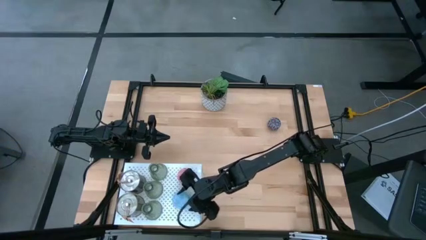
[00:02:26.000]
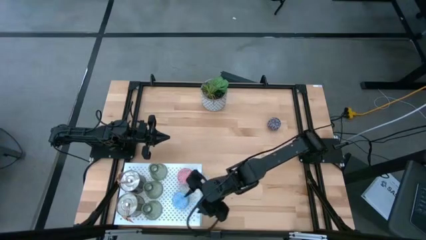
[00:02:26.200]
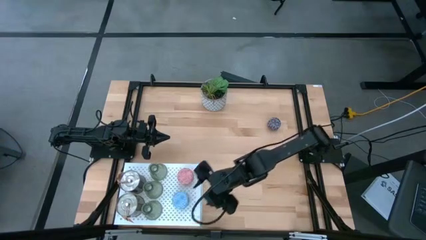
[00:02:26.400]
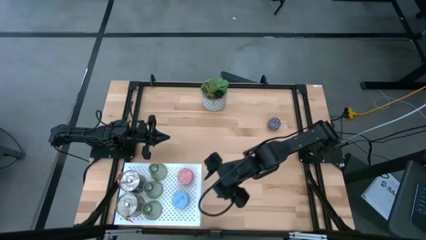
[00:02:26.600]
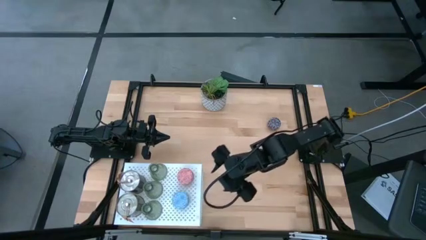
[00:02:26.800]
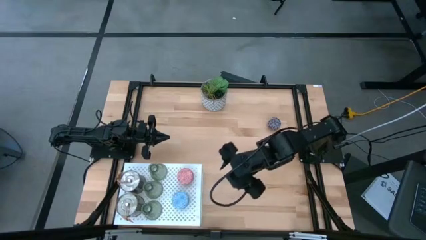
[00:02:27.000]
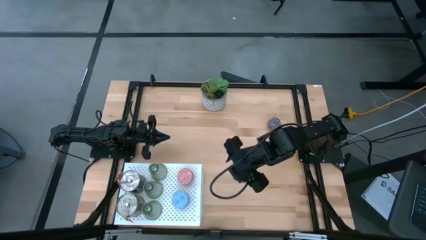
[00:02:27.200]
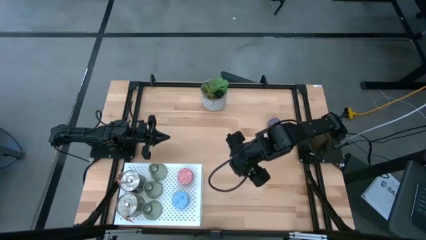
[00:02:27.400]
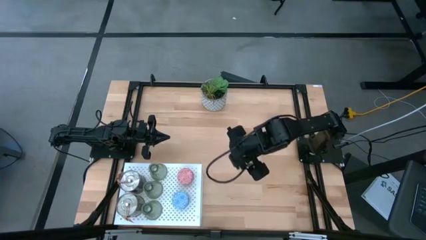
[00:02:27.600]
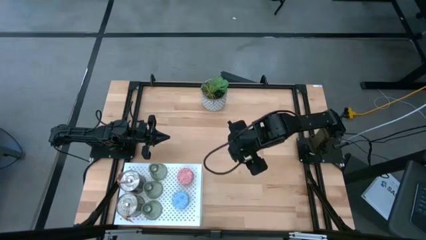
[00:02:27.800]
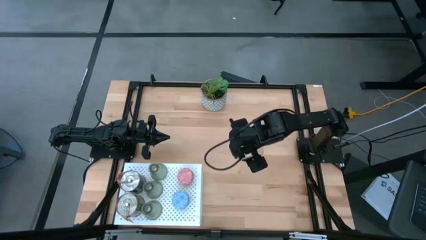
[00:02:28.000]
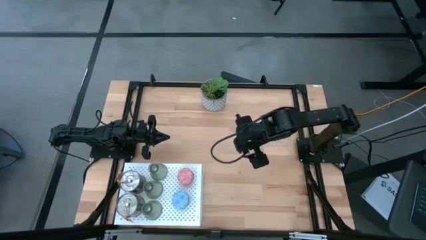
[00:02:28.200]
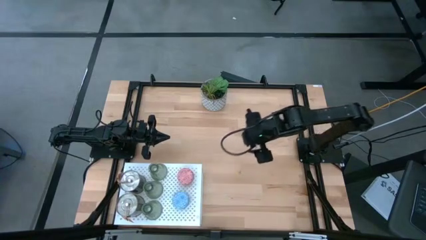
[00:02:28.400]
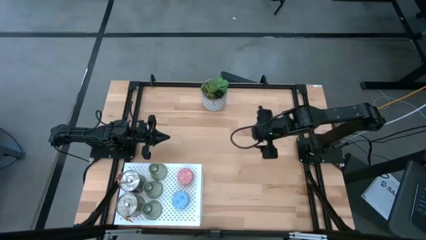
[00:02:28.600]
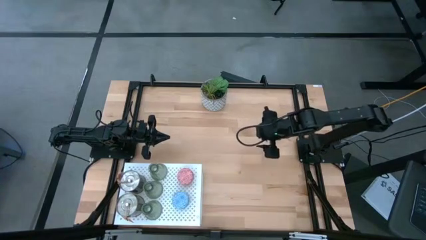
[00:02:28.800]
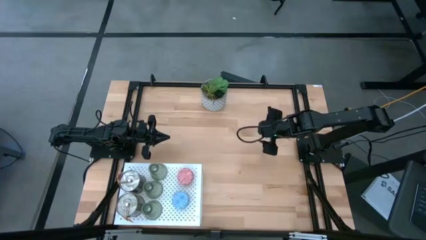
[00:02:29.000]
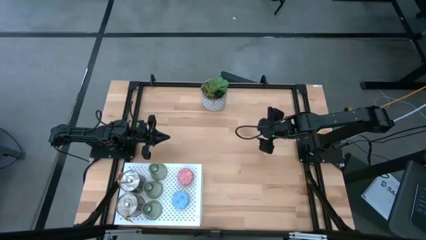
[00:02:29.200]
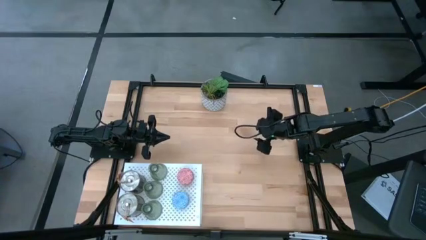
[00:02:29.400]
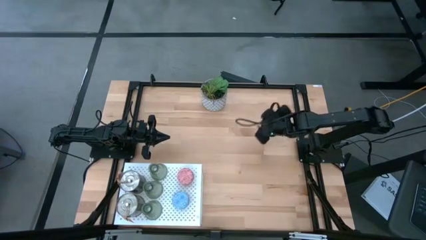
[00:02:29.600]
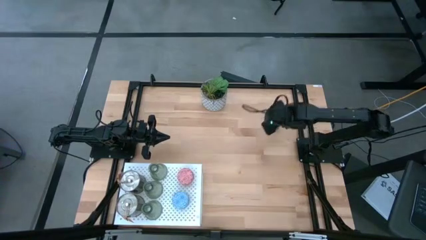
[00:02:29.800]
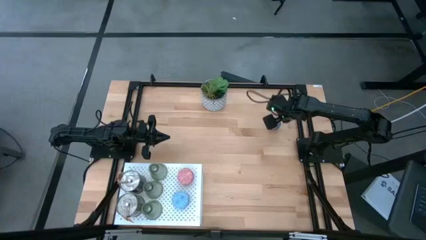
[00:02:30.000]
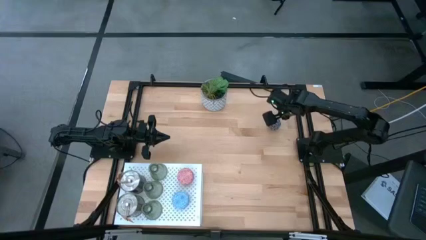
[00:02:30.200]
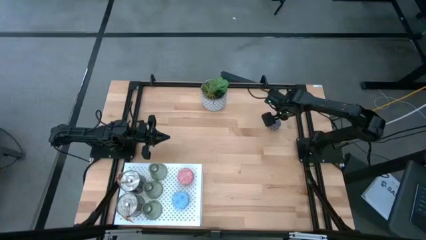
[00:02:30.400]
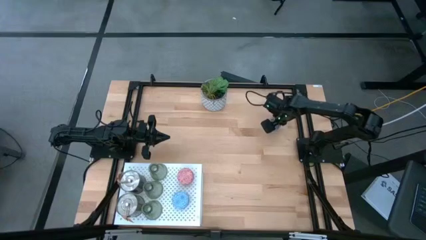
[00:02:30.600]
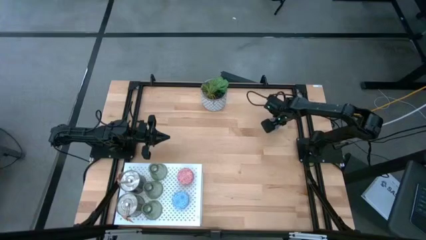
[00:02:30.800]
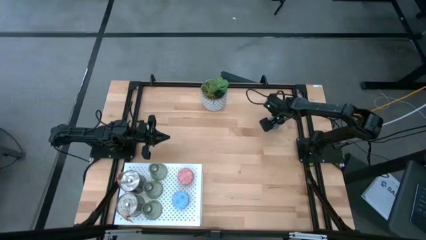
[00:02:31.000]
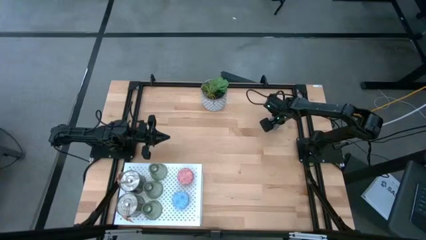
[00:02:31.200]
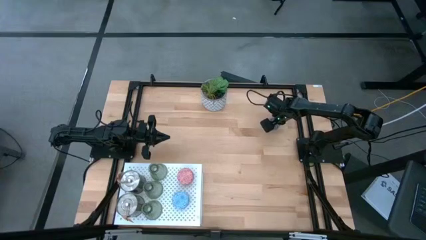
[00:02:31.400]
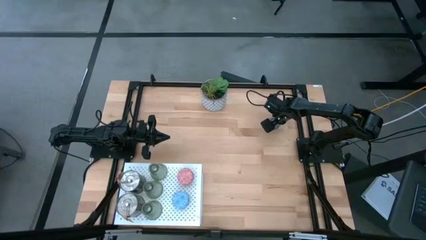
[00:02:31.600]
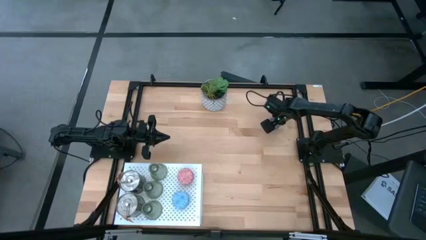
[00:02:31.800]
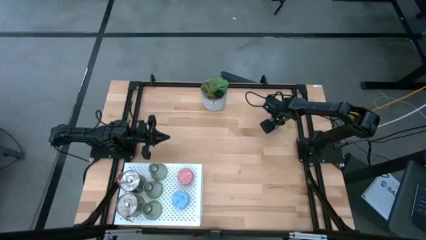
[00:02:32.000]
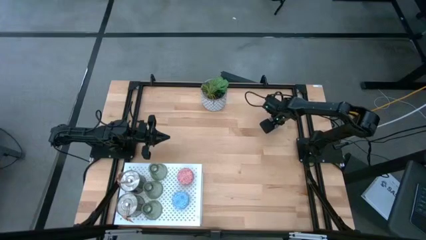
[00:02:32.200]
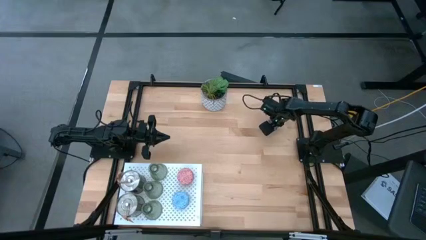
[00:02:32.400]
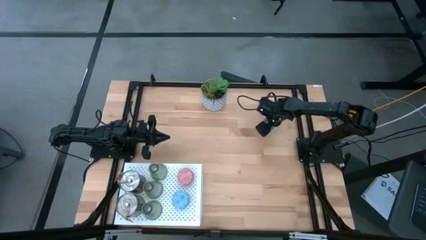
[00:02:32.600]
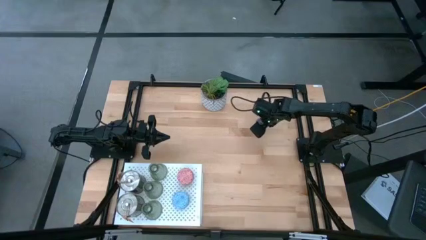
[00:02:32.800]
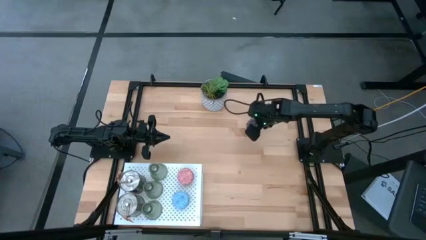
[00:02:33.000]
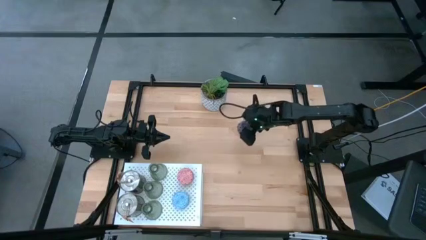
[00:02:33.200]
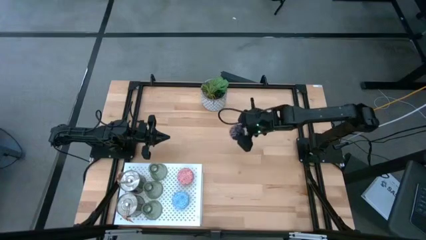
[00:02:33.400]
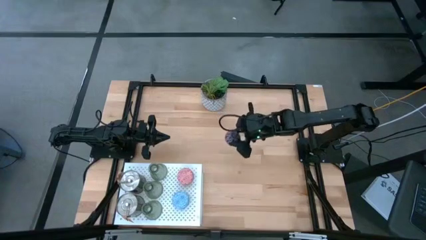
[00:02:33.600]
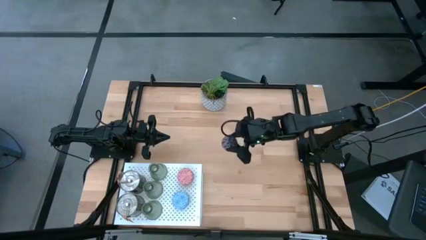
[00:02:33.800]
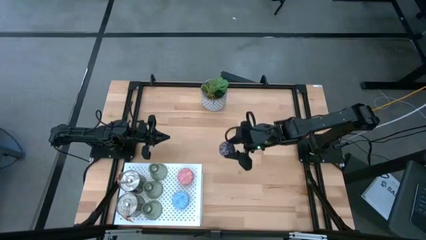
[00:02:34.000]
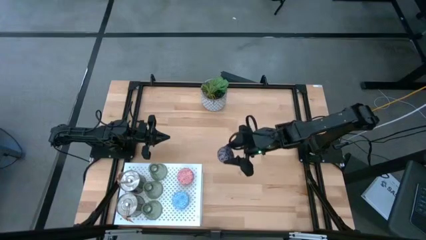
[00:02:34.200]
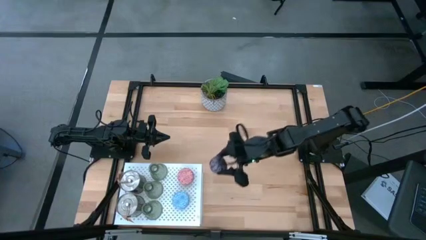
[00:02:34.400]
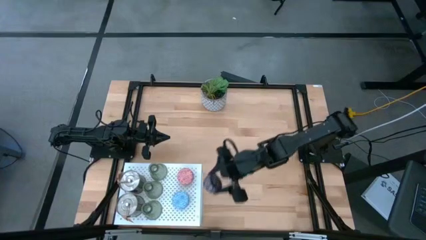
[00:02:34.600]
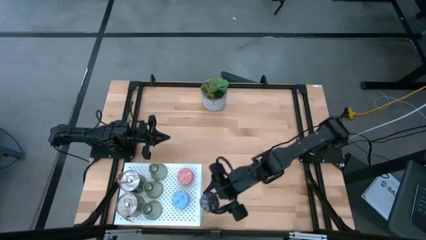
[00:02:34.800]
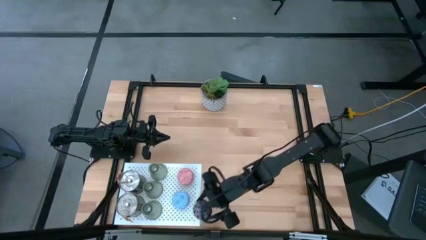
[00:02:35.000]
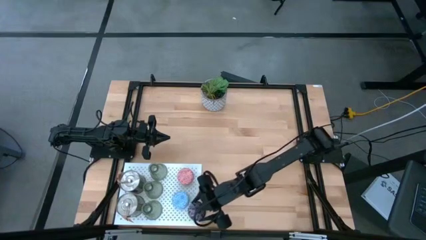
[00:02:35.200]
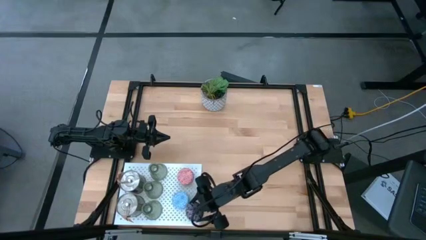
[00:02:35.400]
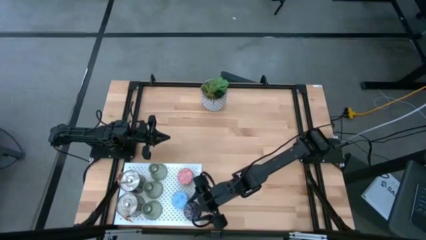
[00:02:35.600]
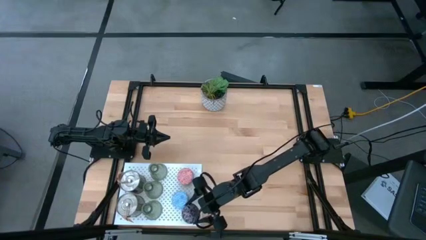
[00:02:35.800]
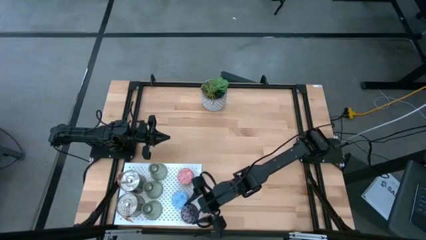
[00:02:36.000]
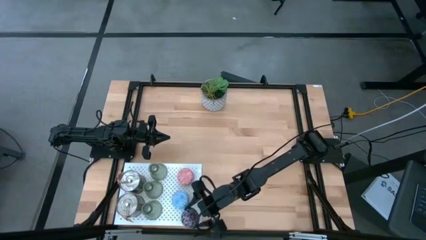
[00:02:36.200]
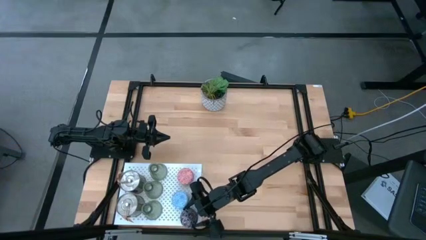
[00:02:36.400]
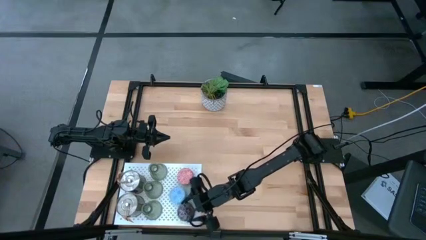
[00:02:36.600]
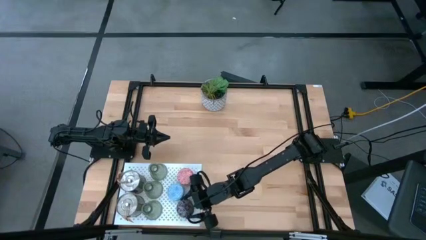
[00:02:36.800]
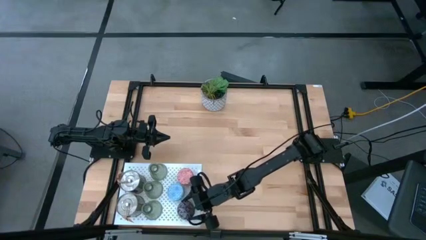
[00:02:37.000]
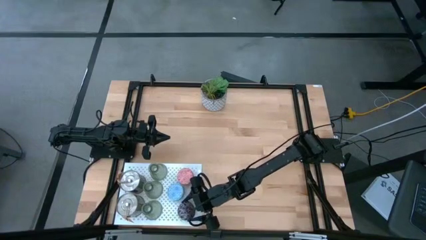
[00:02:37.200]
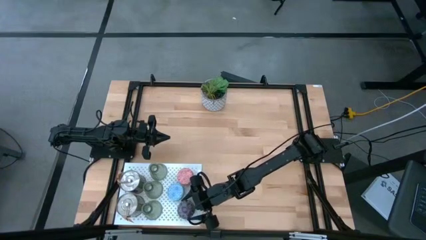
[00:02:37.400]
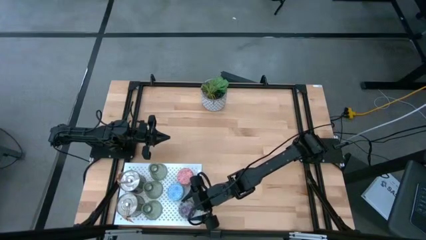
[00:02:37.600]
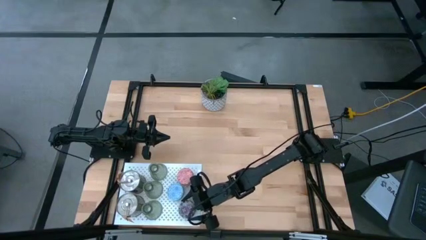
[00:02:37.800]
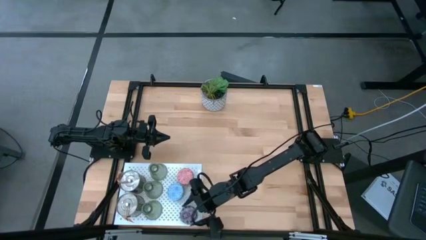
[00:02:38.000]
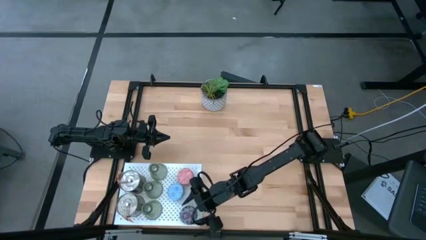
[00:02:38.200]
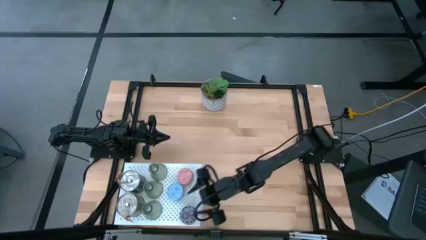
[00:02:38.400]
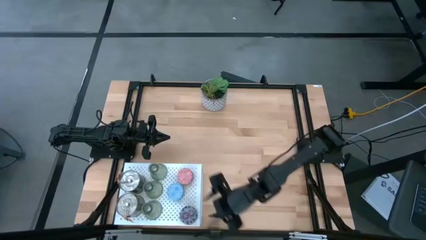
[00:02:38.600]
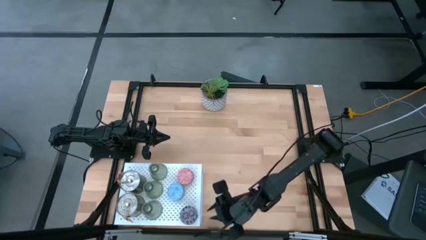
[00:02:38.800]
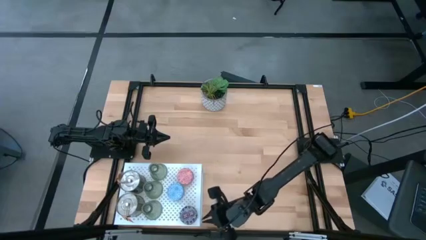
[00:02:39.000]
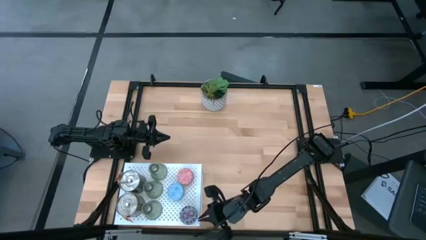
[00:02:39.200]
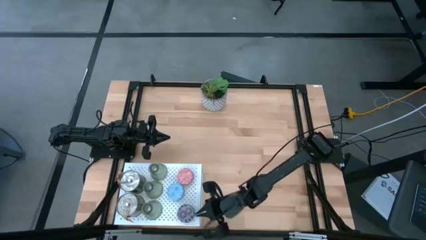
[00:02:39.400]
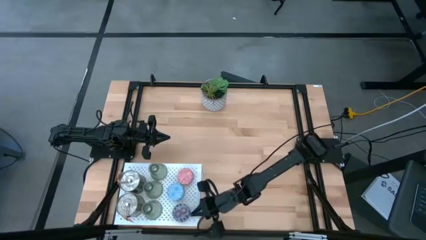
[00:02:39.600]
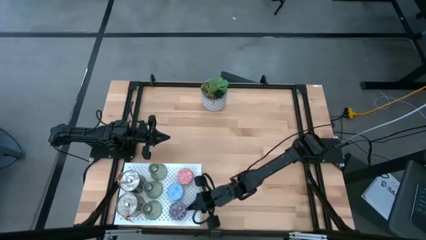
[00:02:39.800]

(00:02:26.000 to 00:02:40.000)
Task: Pick & Place candle stick holders
Put the red scented candle on the shelf

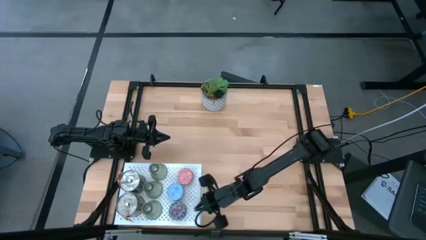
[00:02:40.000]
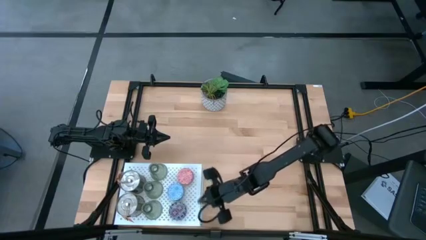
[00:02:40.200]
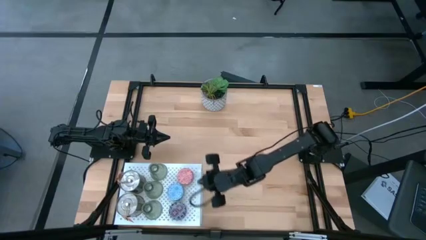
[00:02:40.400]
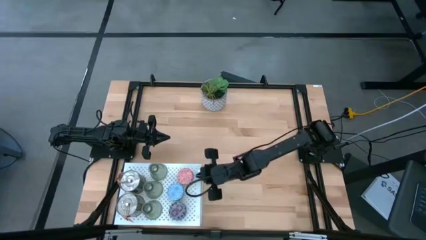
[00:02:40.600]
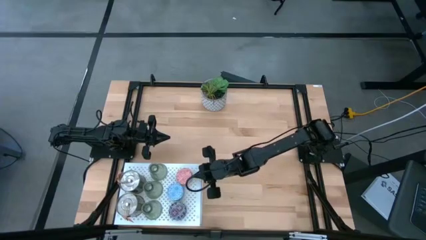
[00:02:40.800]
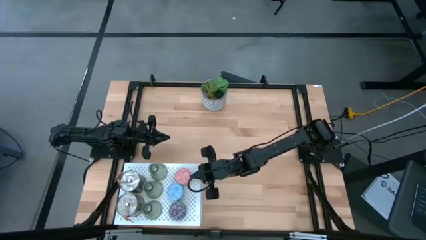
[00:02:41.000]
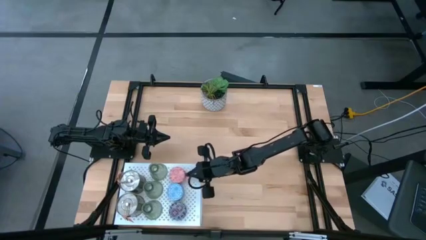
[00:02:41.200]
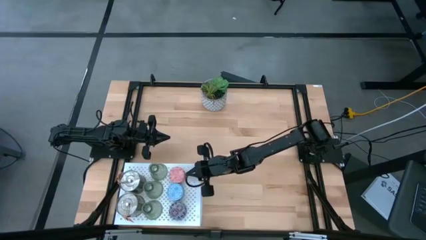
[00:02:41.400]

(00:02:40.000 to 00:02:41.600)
Adjust the pink scented candle on the shelf
